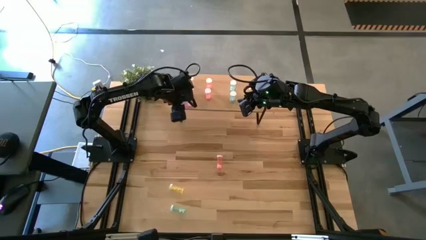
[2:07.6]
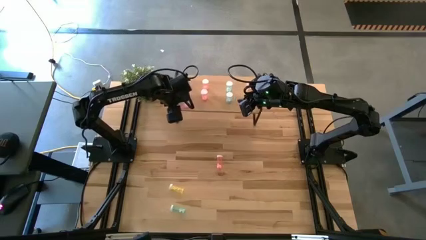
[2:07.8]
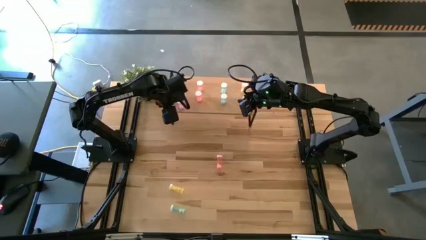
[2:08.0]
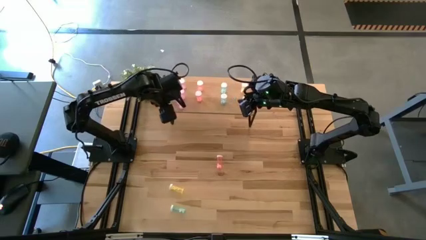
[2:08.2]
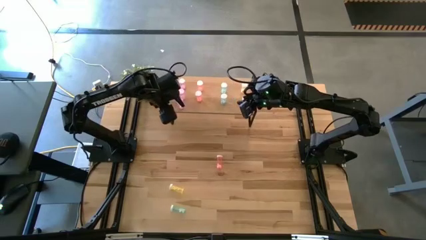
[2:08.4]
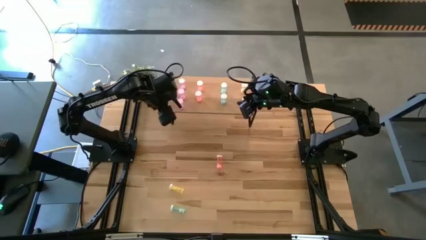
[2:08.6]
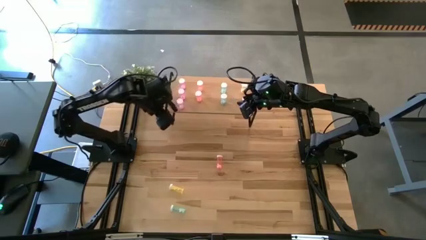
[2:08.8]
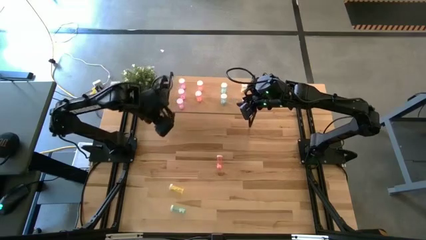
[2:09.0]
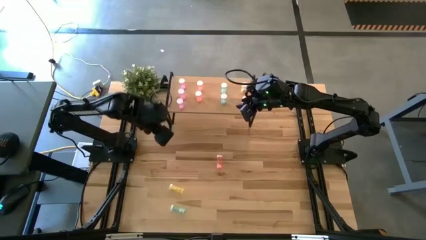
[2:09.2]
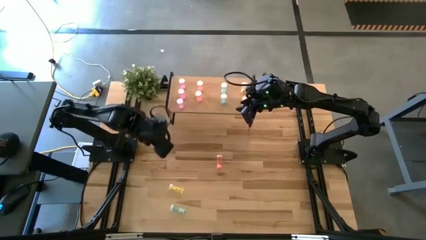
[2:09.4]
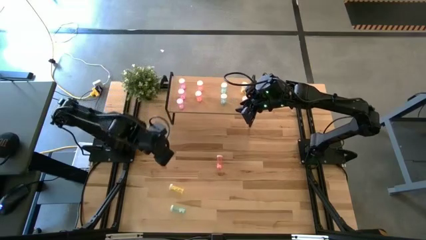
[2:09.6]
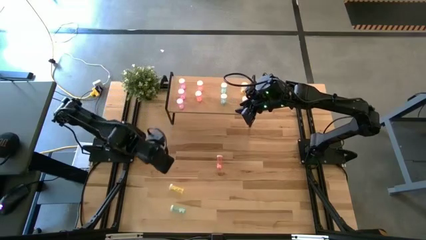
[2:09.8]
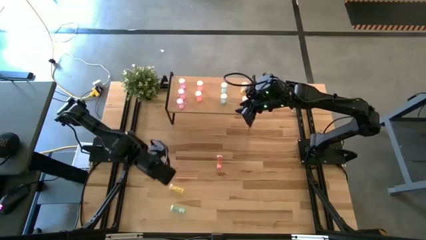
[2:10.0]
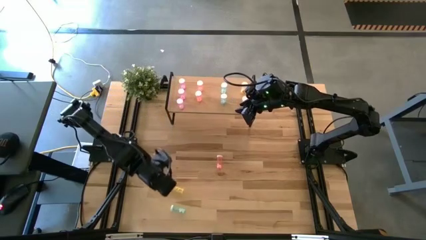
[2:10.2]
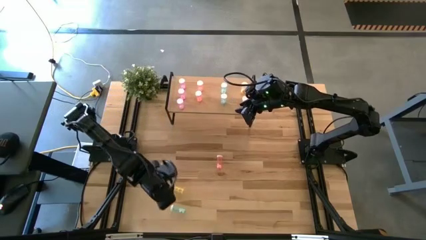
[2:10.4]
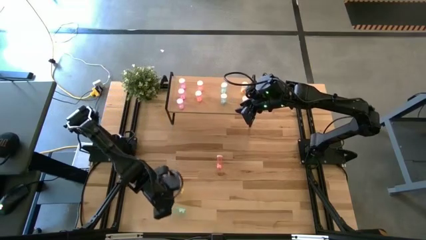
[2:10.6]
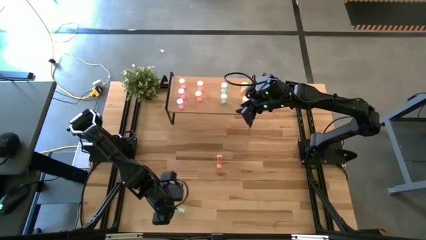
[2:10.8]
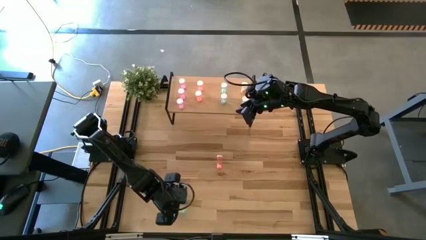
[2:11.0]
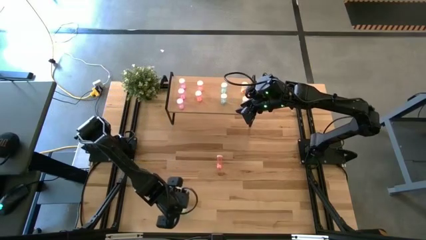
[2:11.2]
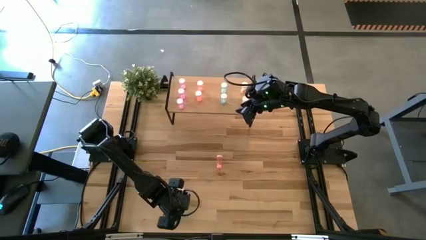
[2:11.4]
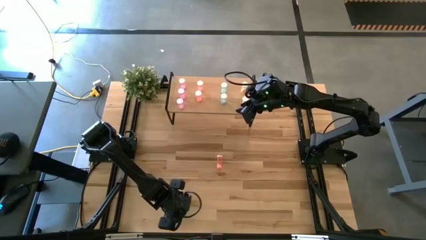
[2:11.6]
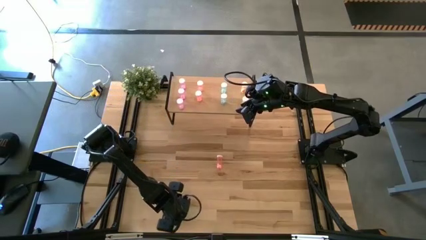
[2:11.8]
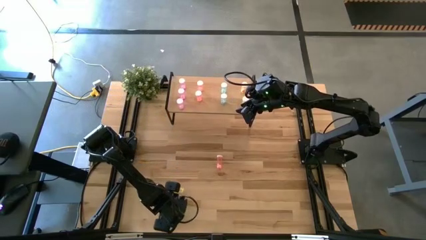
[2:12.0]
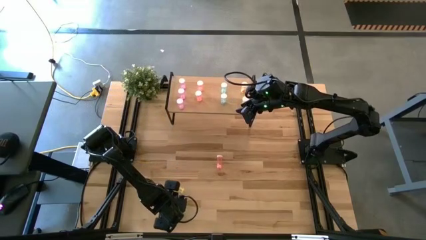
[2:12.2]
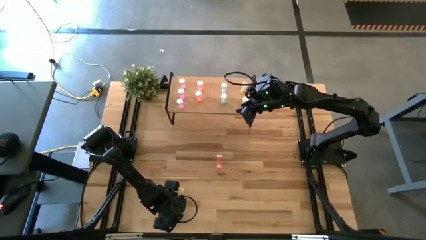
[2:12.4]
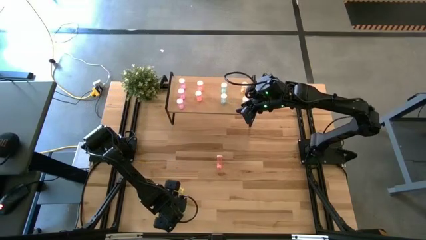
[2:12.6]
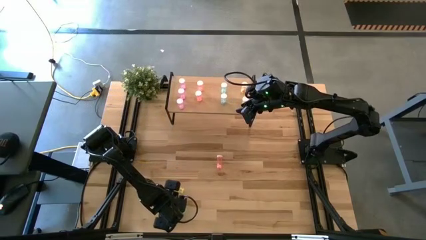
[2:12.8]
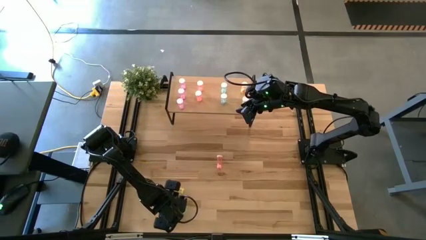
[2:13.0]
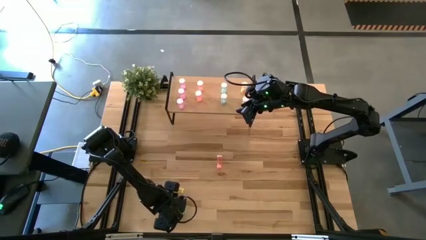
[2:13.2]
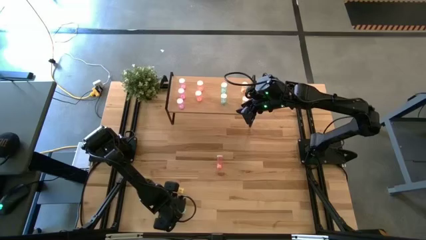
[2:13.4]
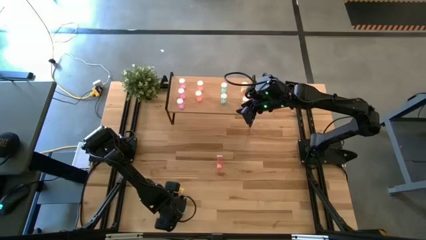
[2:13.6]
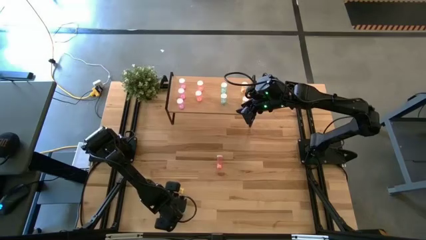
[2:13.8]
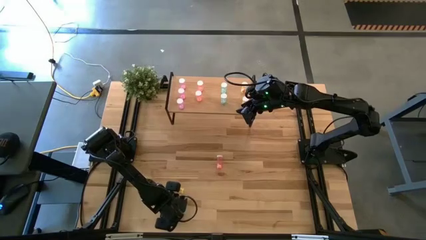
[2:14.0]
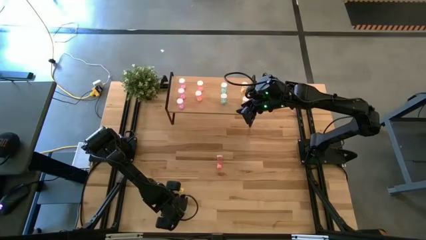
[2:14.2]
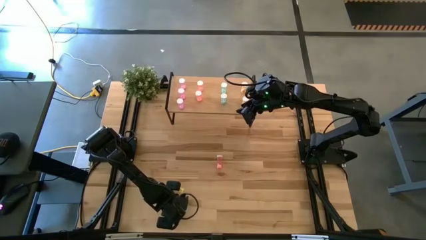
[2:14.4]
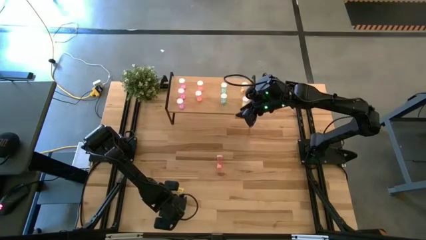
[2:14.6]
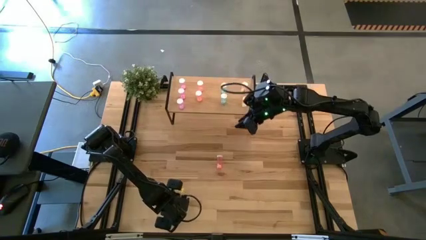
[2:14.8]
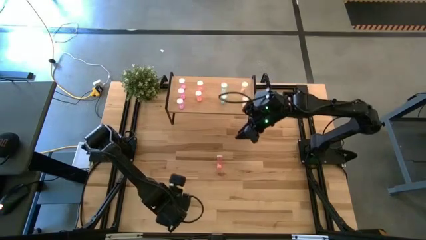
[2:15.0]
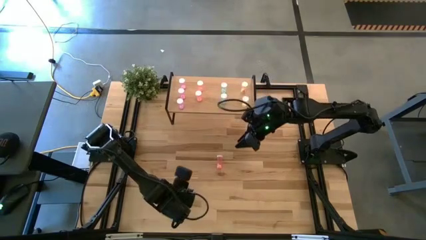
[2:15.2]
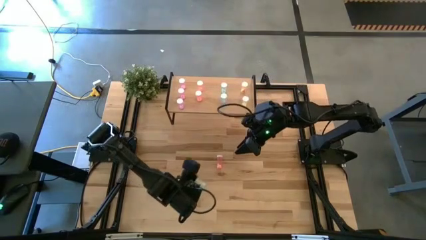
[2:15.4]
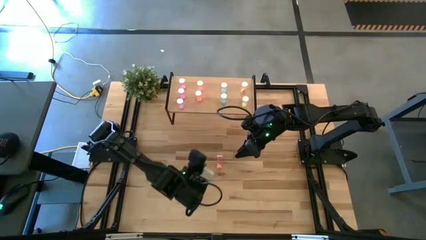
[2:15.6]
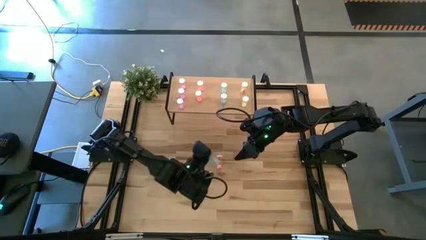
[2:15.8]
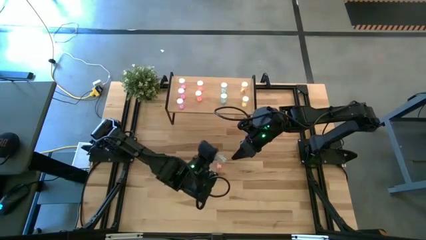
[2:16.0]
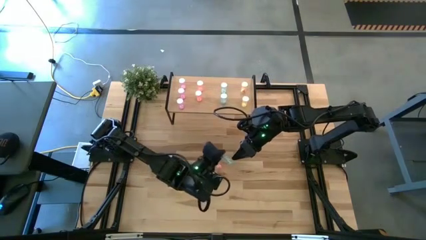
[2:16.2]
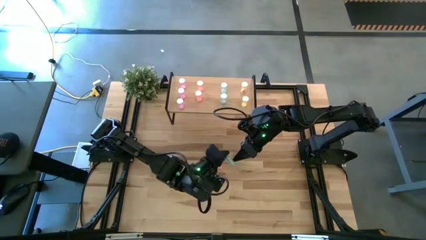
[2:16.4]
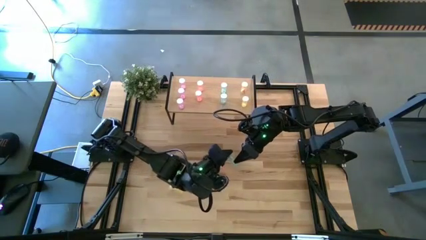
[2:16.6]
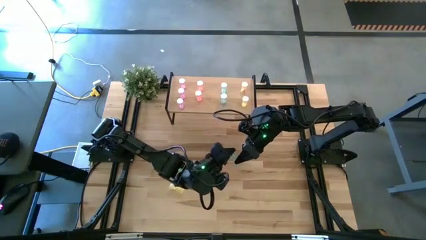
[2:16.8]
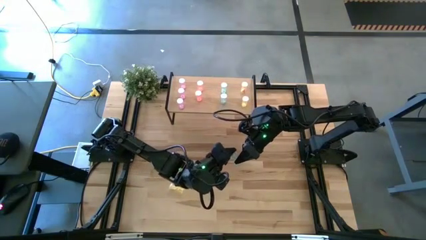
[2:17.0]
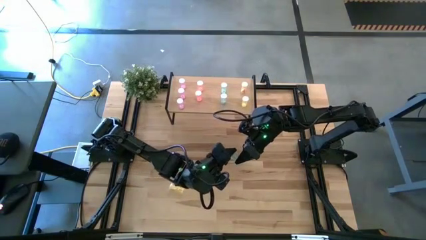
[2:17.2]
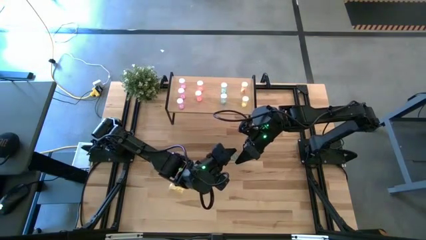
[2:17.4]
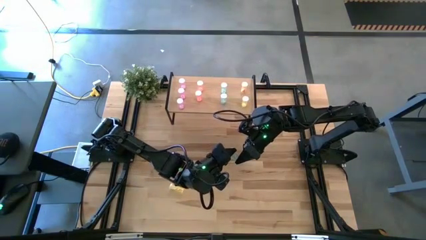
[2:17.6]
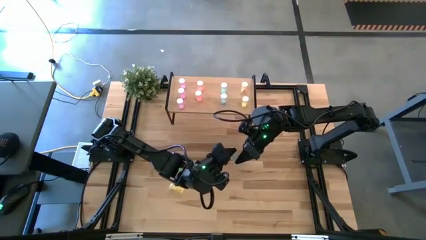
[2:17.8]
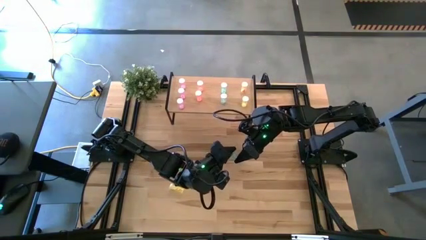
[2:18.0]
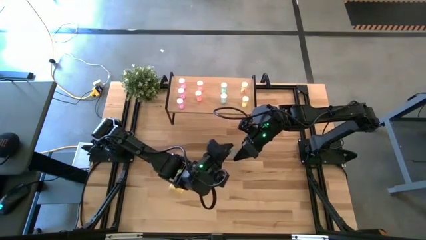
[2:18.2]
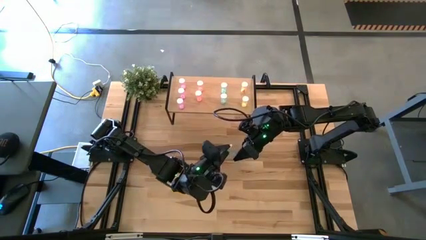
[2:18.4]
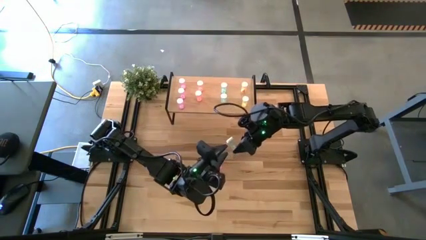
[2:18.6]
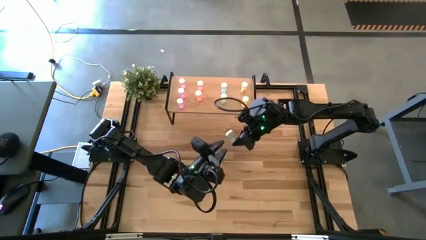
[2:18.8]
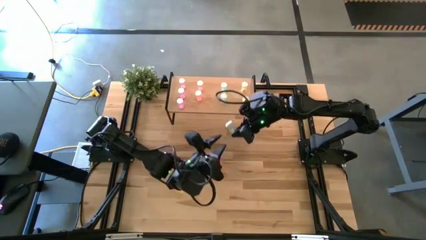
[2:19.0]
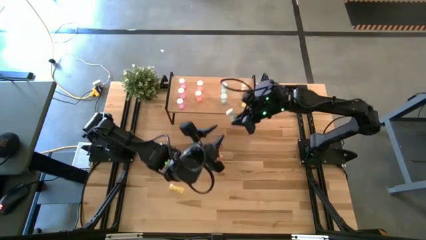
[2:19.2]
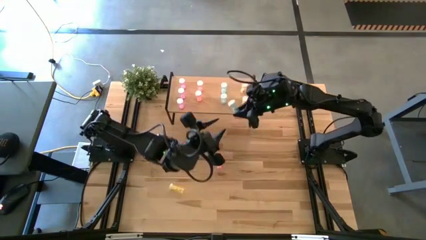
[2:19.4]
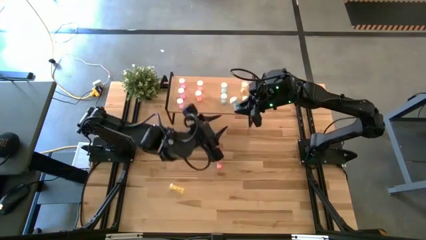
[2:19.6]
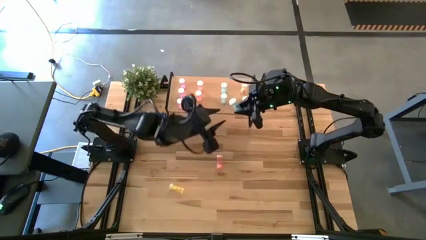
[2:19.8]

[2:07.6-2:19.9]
Task: Pick and place medicine bottles onto shelf by color
Put the blue pill bottle on the shelf aligned with the other blue pill bottles
